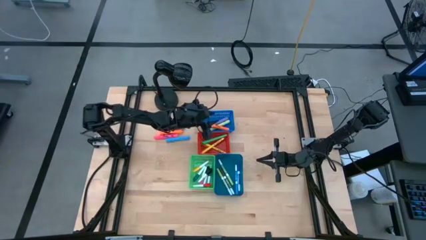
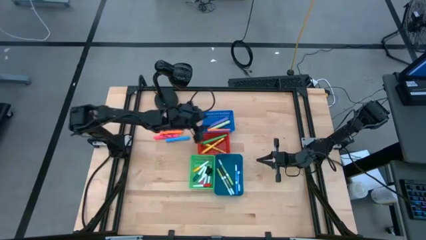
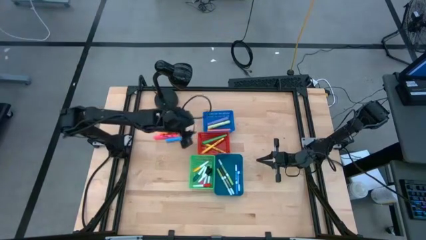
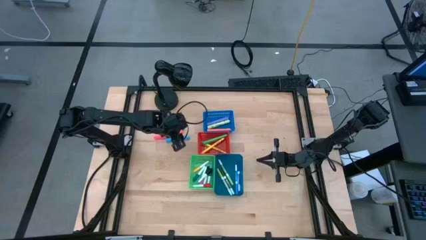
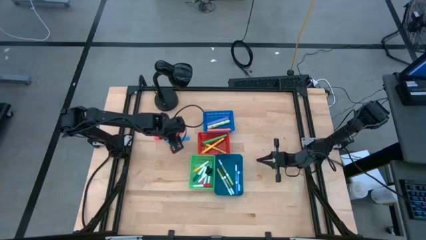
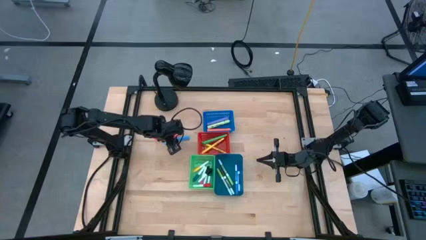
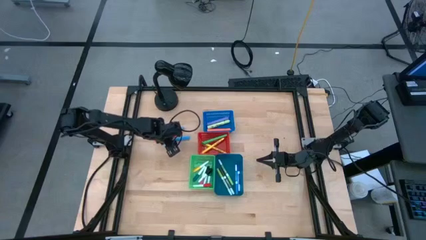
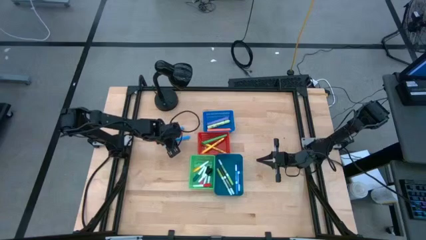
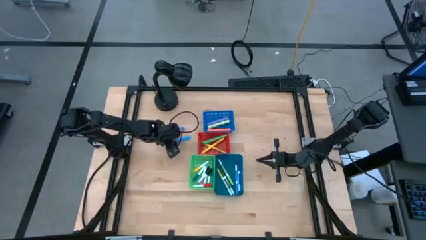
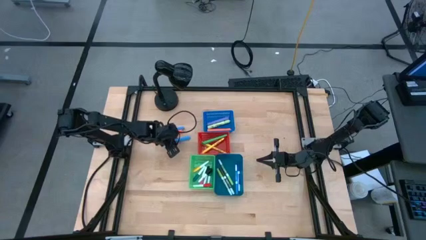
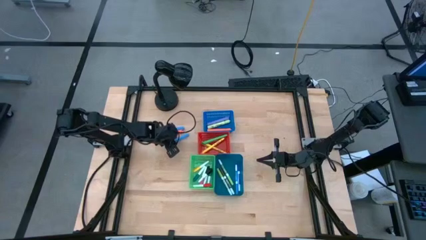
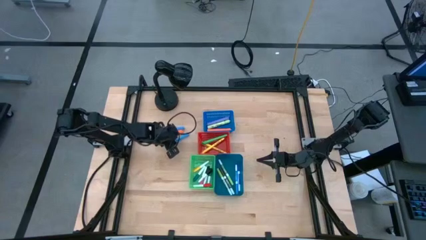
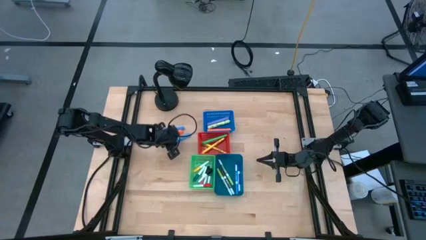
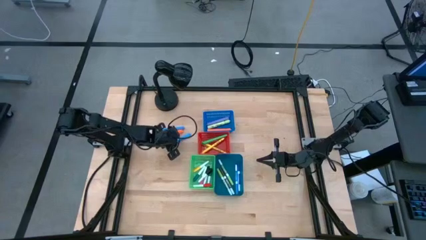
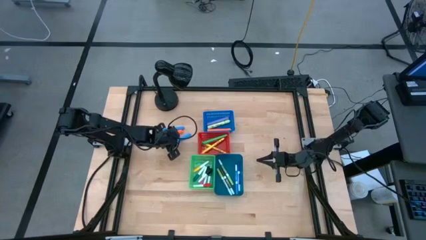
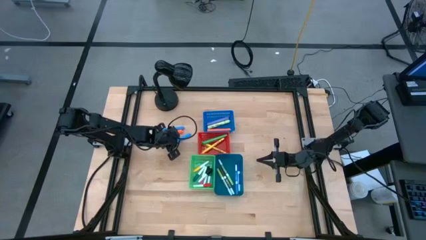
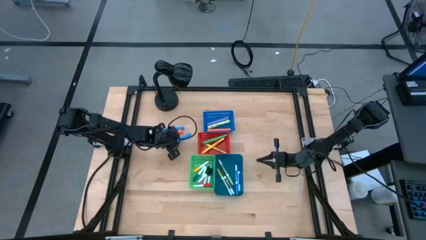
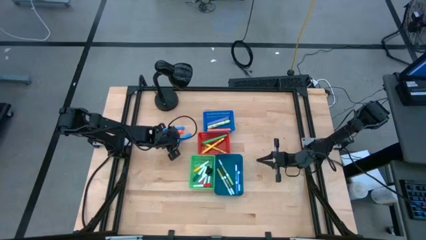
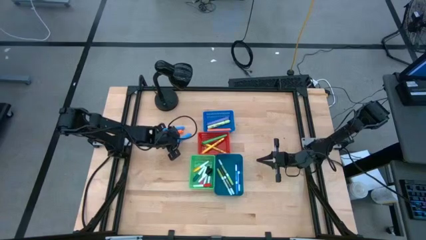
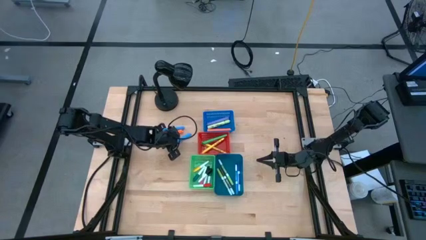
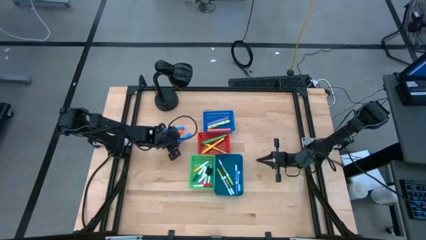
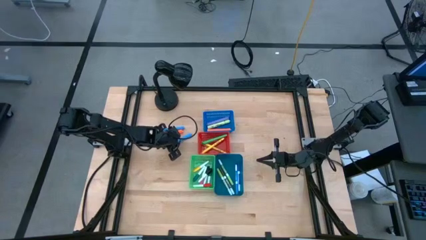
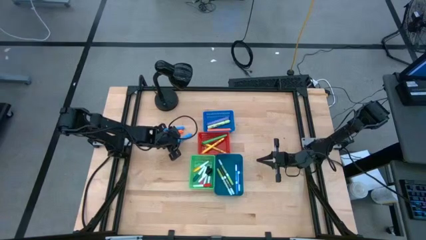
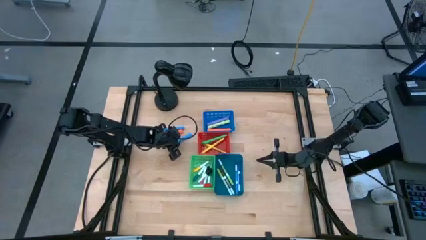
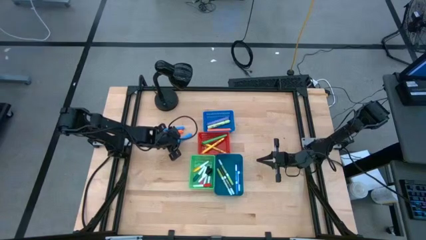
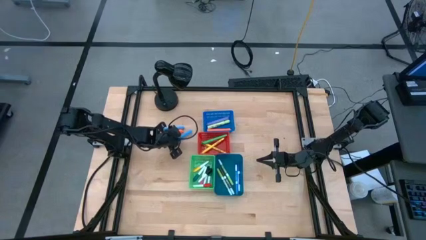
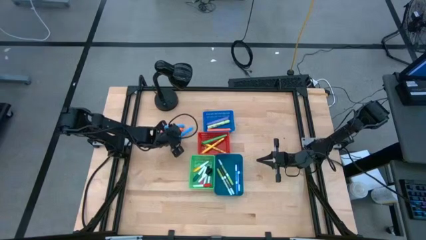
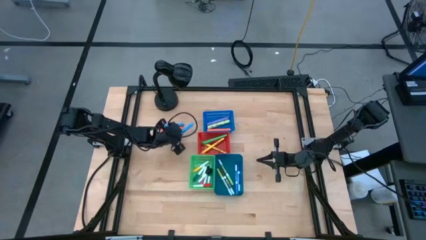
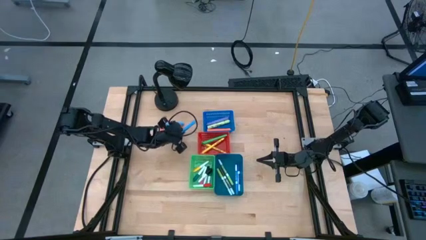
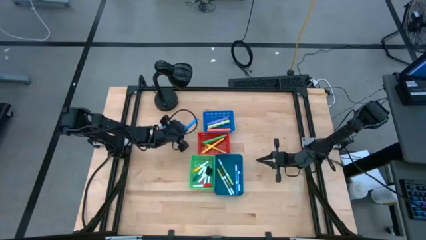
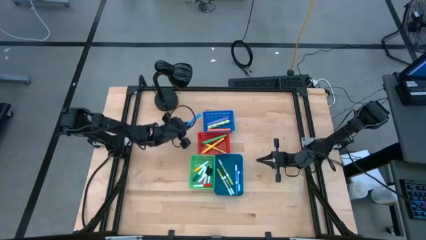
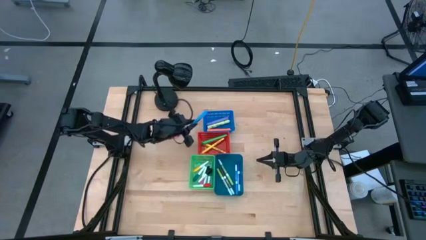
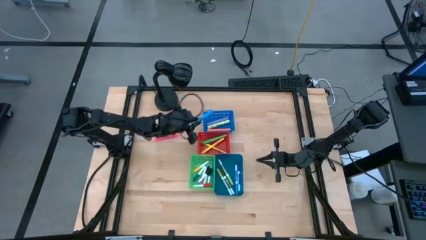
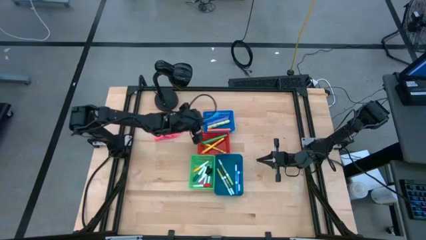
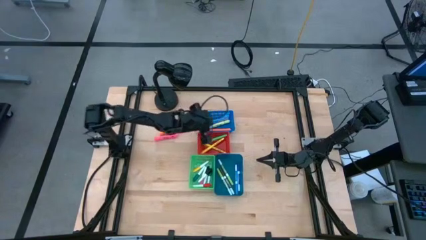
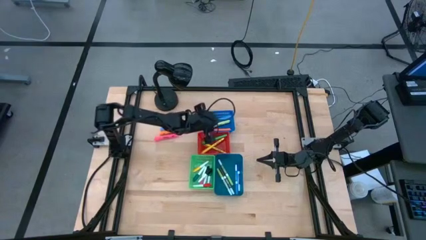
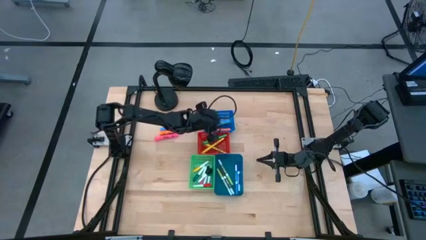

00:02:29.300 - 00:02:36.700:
Task: Pick & Place Markers
Put the bottom large light blue highlighter pen into the blue bin

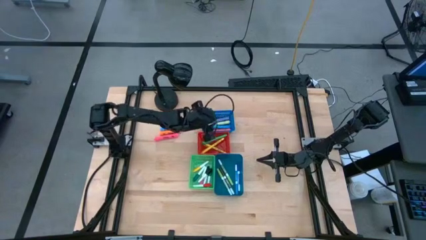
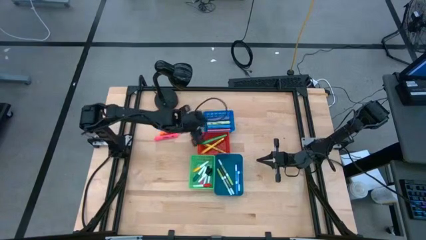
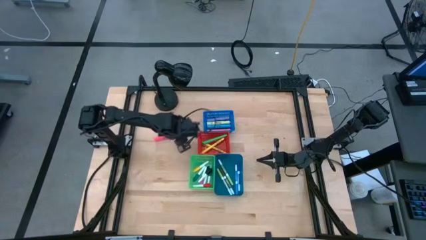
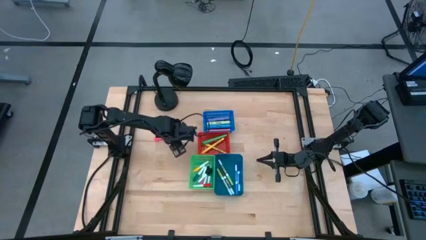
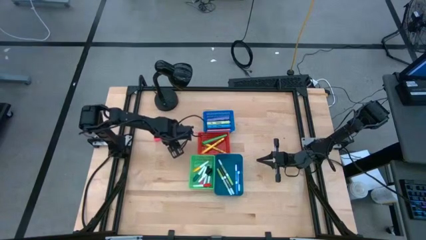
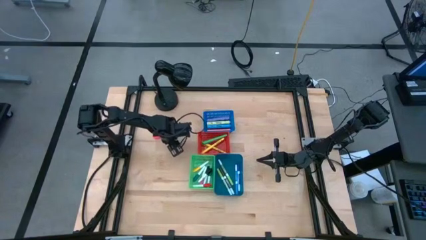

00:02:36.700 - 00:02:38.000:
Put the large pink highlighter pen into the blue bin

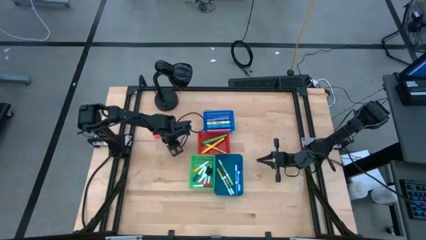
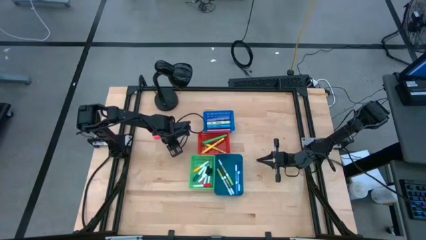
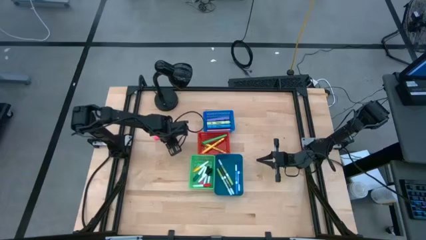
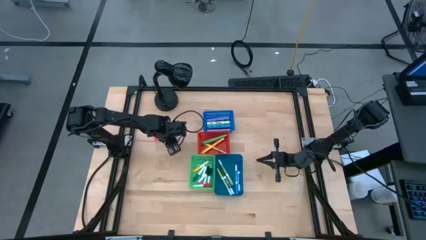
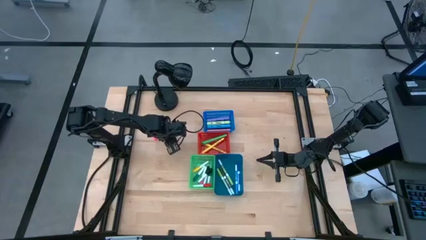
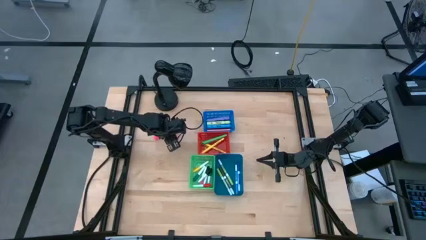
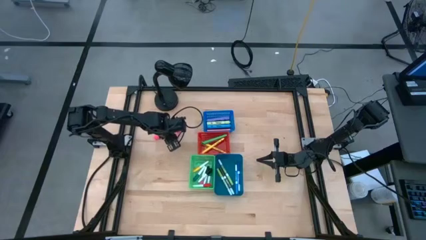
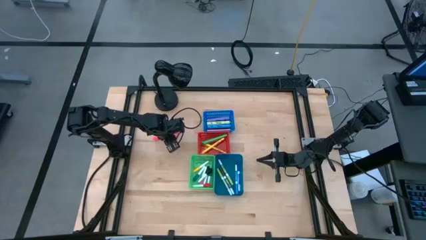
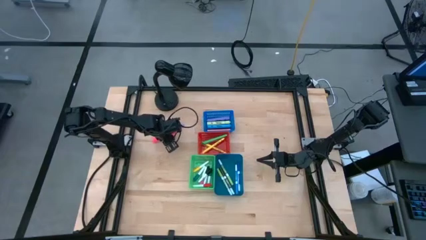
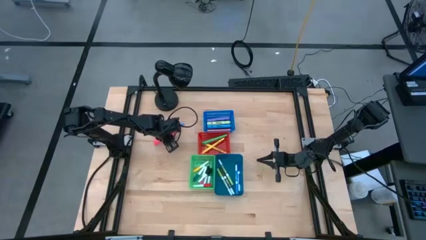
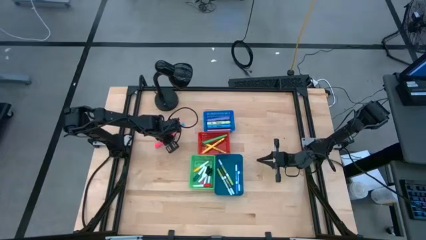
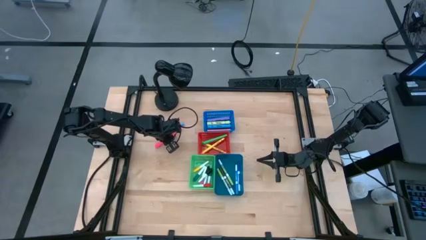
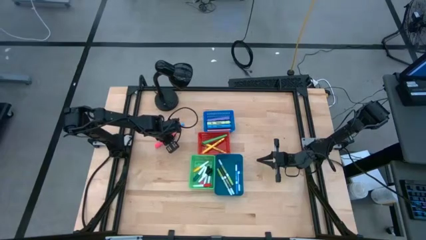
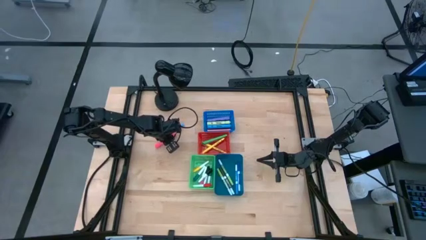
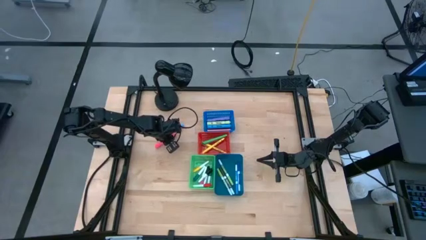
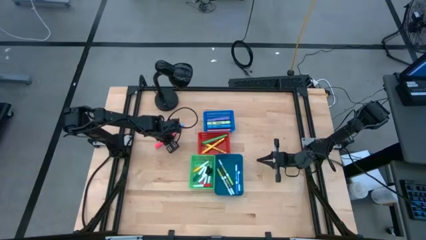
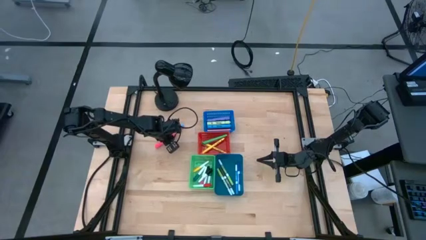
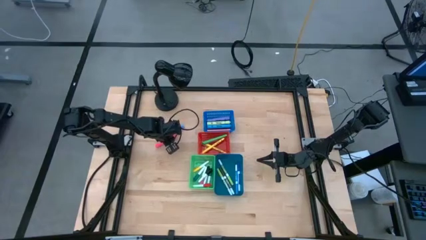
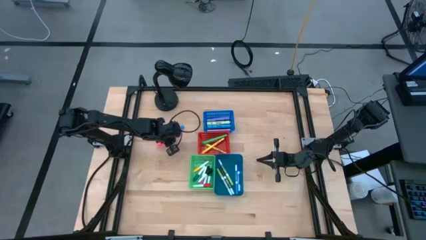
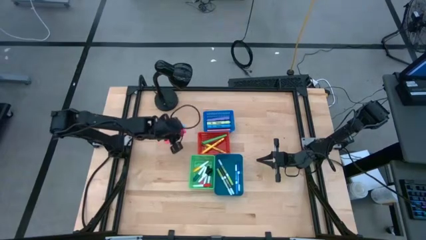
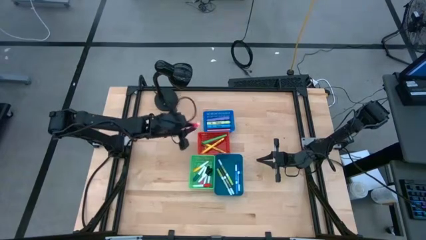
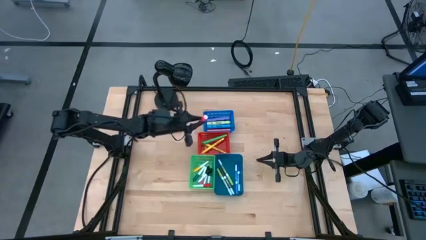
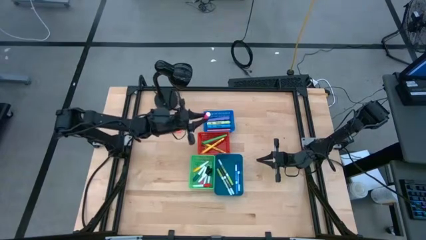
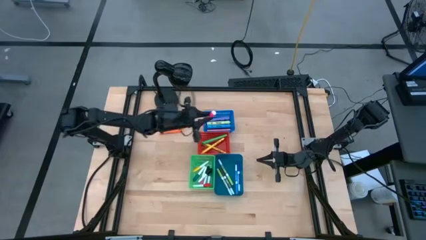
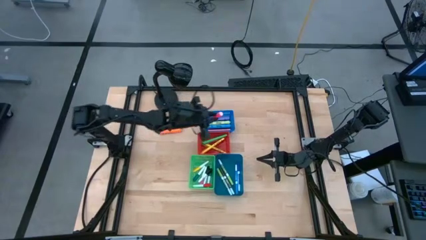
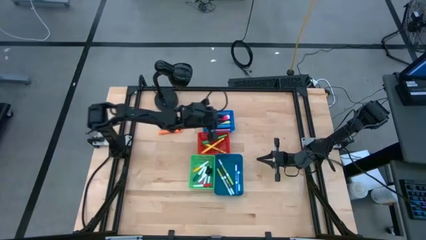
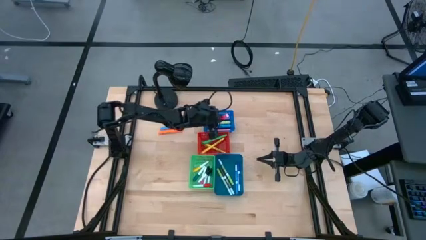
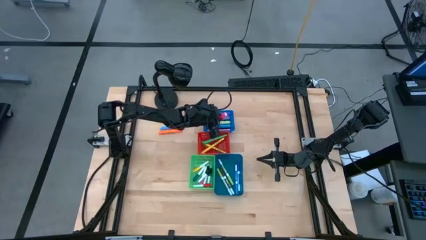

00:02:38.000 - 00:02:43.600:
Put the large pink highlighter pen into the blue bin

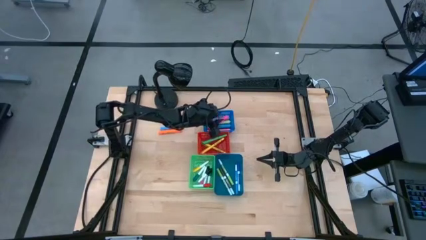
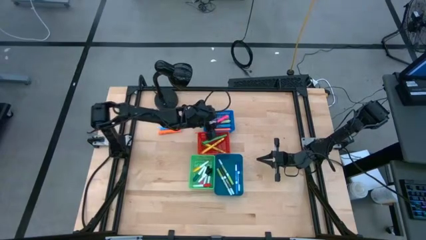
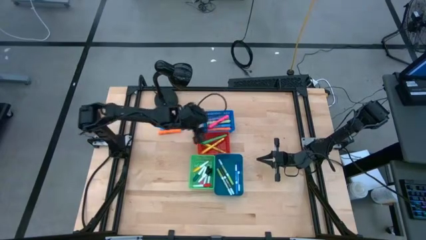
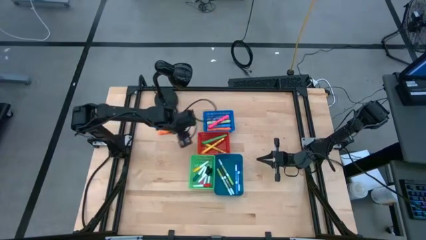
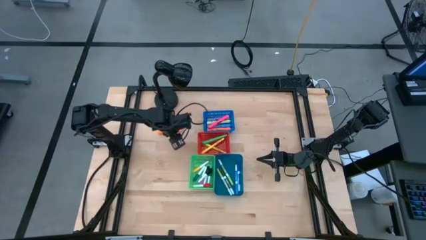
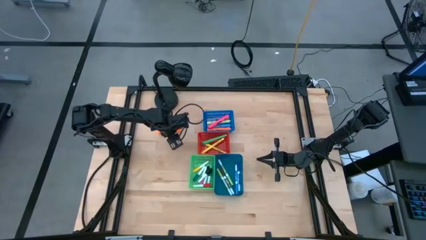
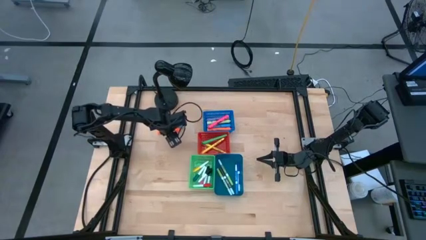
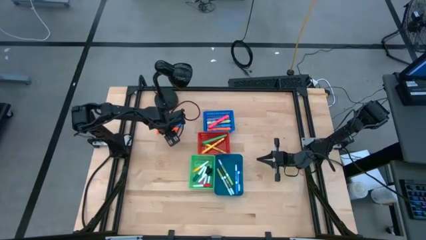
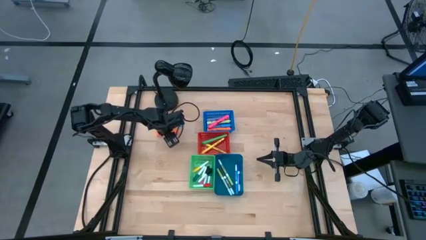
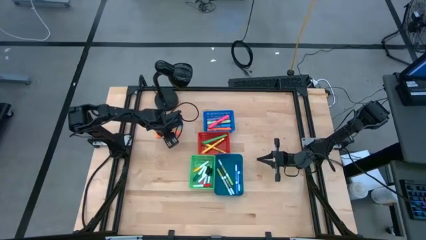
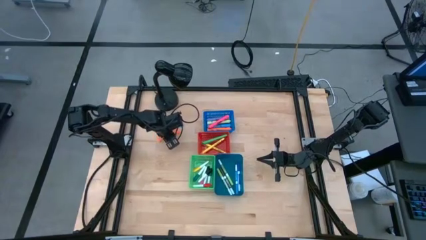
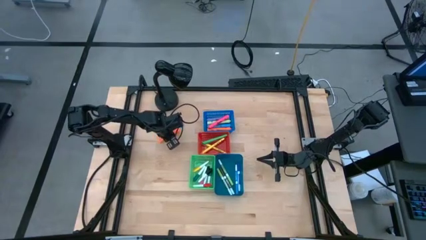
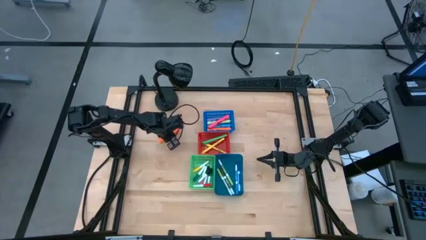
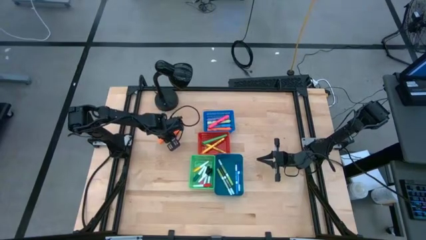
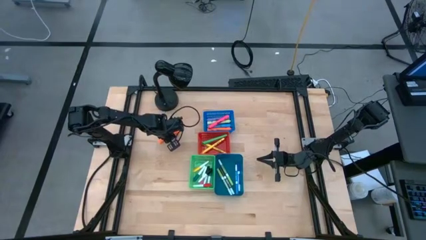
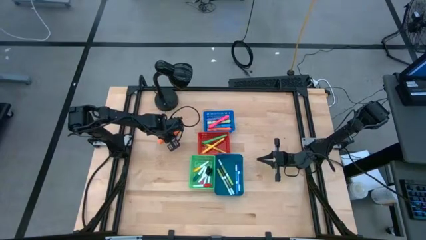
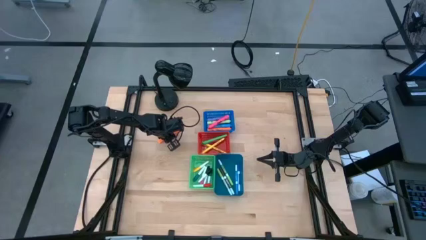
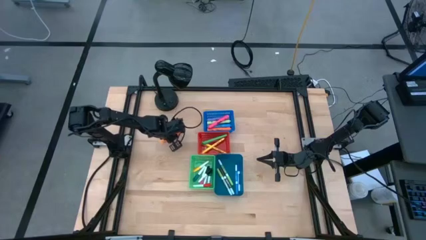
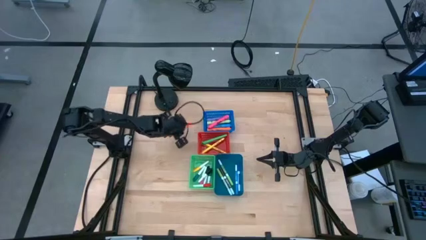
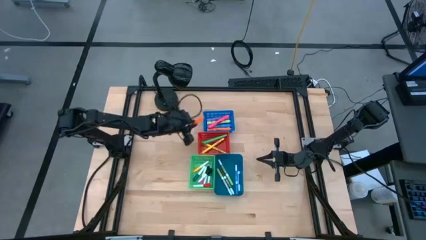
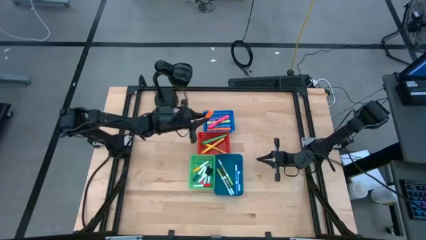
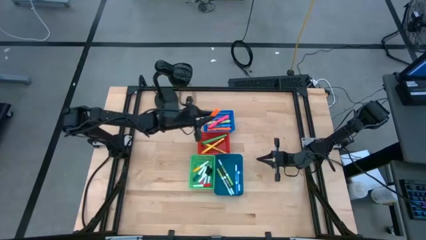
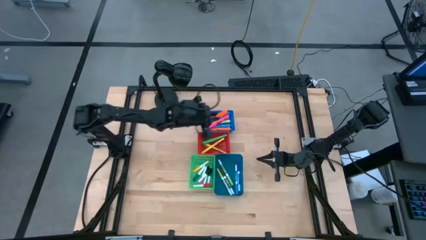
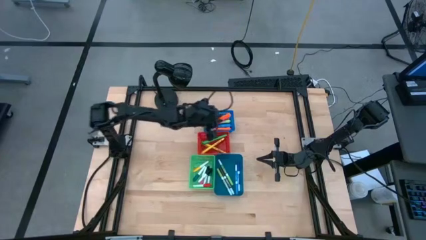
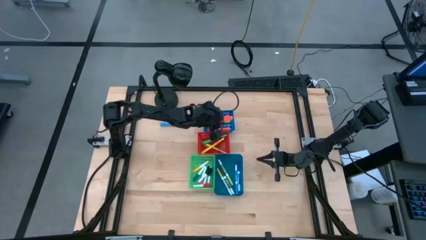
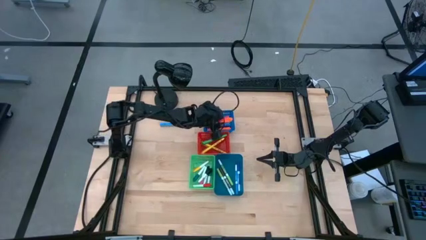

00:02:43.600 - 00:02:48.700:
Put the large orange highlighter pen into the blue bin
